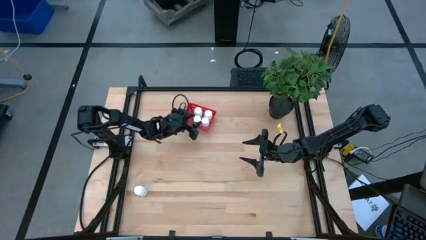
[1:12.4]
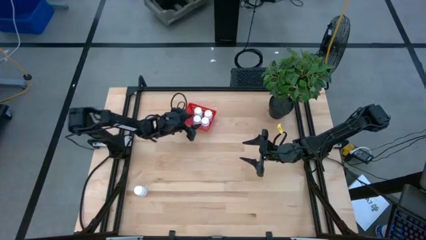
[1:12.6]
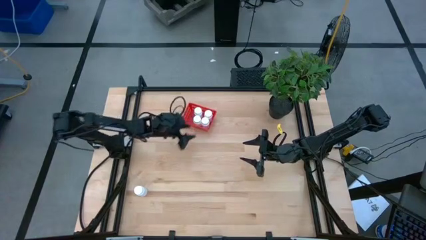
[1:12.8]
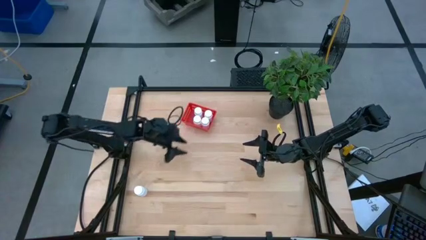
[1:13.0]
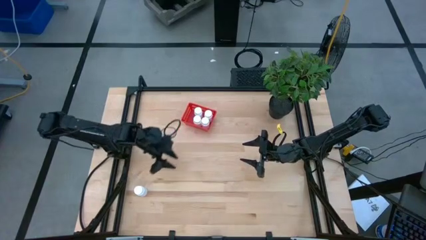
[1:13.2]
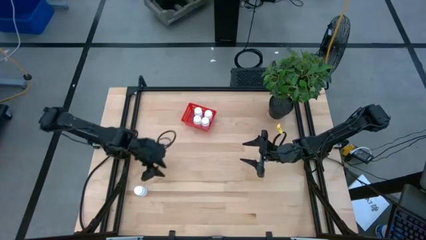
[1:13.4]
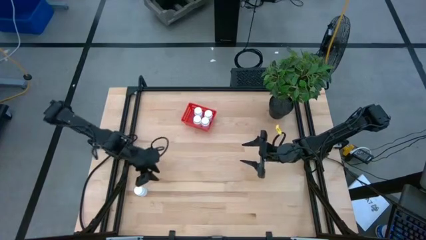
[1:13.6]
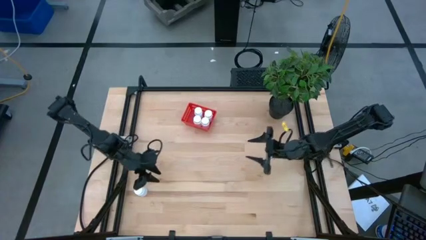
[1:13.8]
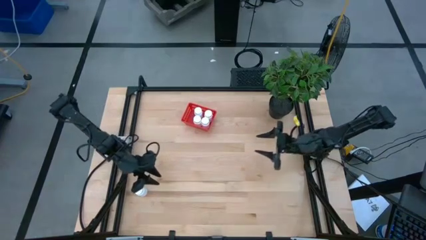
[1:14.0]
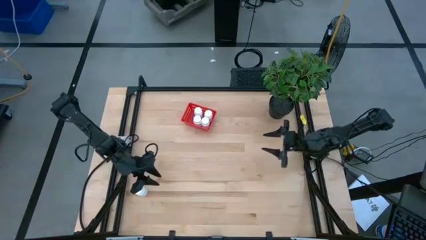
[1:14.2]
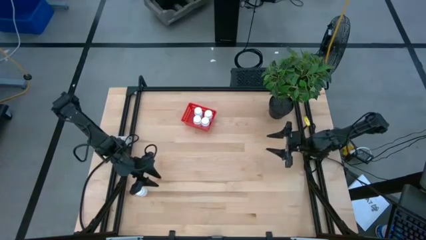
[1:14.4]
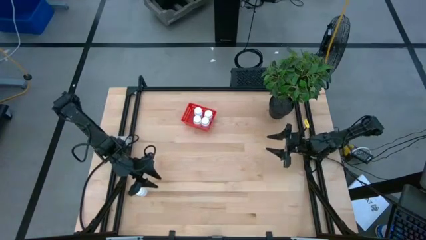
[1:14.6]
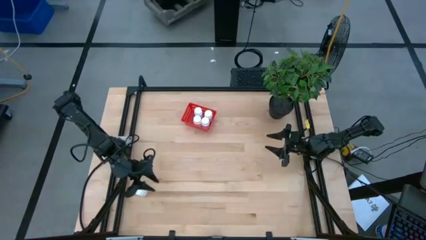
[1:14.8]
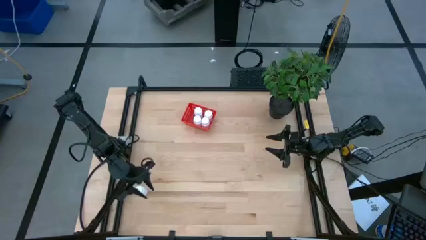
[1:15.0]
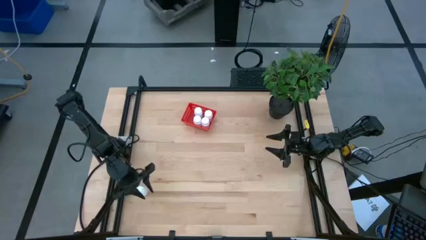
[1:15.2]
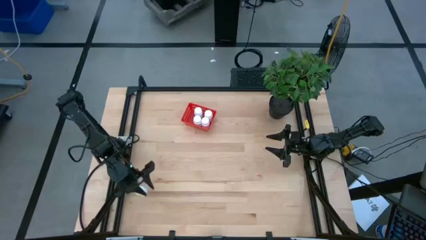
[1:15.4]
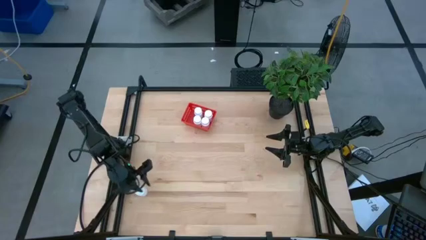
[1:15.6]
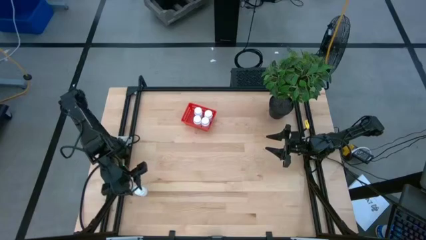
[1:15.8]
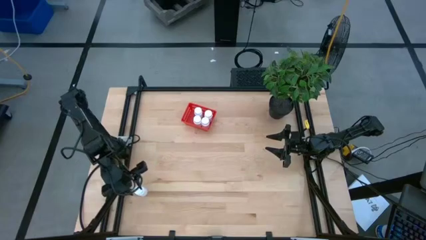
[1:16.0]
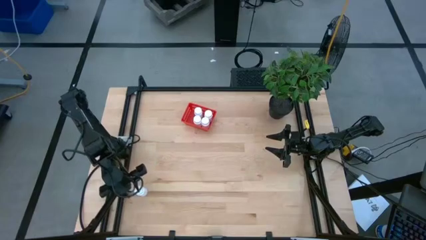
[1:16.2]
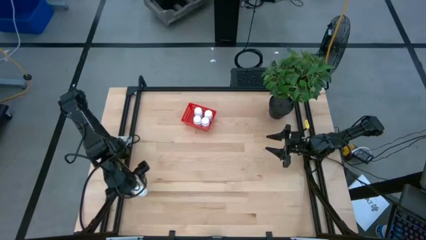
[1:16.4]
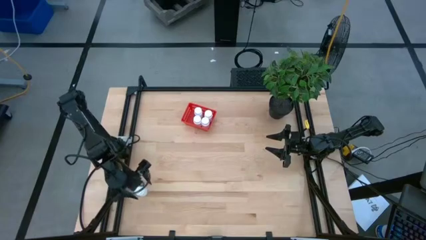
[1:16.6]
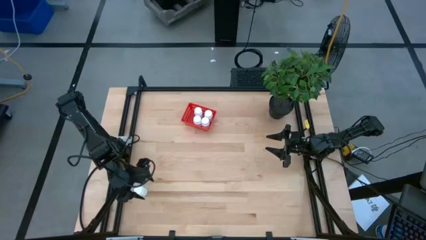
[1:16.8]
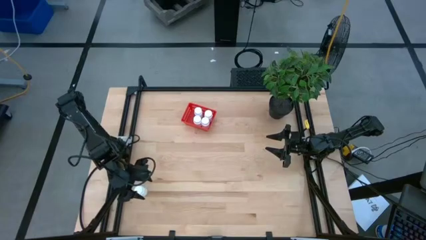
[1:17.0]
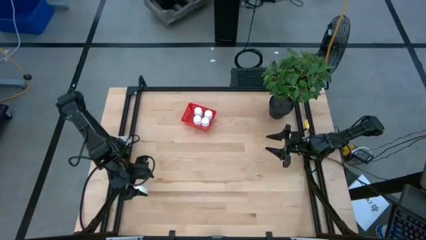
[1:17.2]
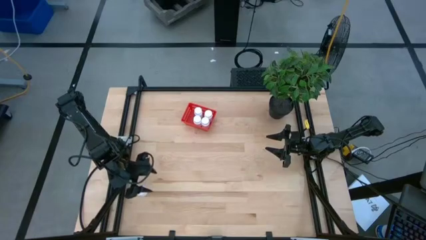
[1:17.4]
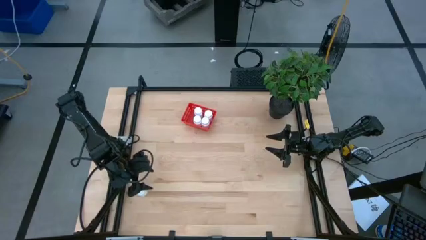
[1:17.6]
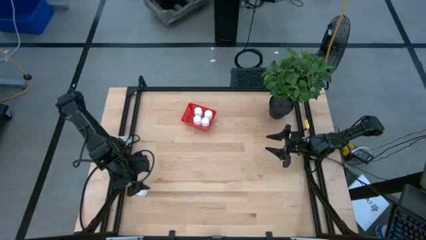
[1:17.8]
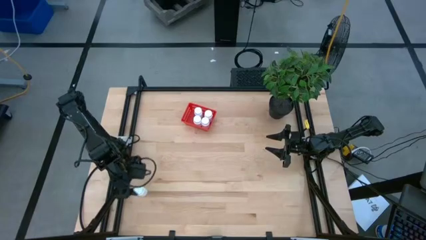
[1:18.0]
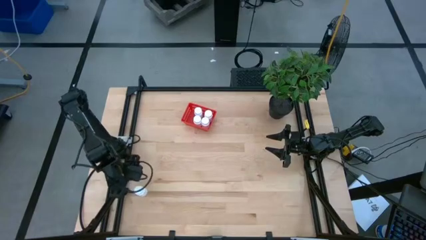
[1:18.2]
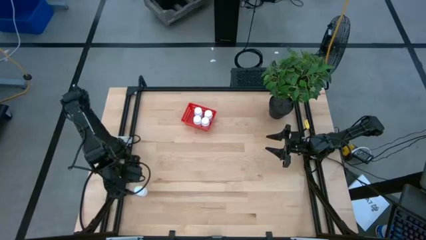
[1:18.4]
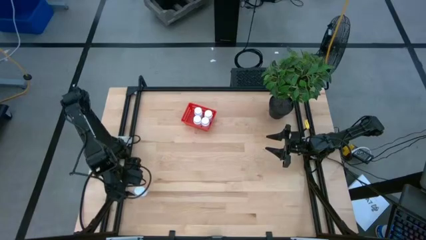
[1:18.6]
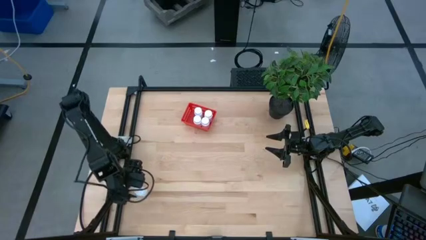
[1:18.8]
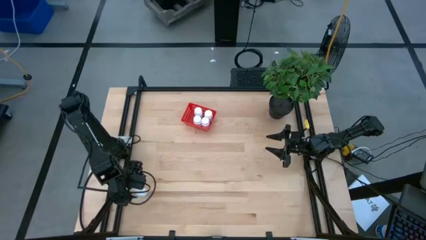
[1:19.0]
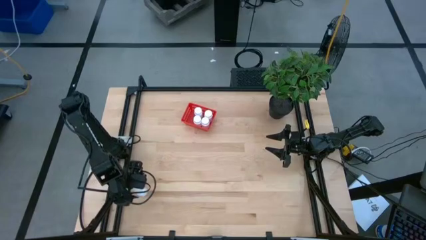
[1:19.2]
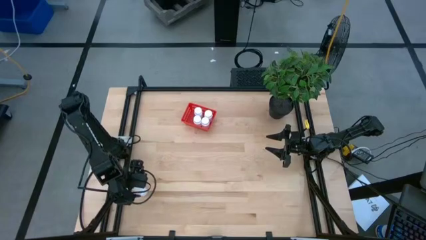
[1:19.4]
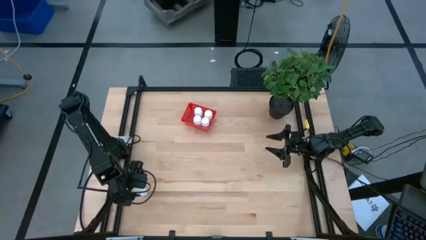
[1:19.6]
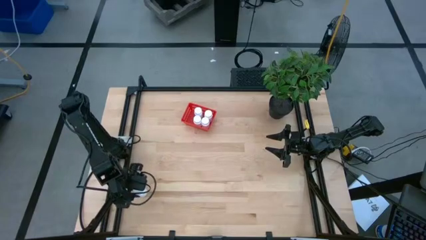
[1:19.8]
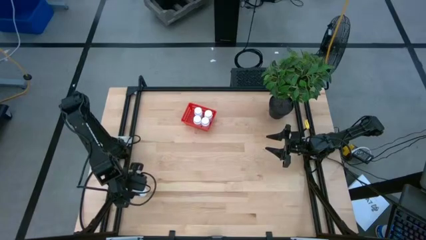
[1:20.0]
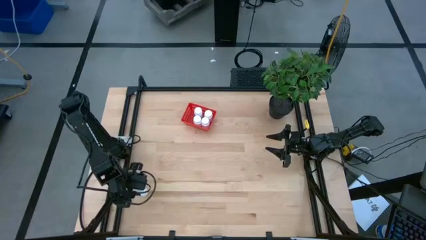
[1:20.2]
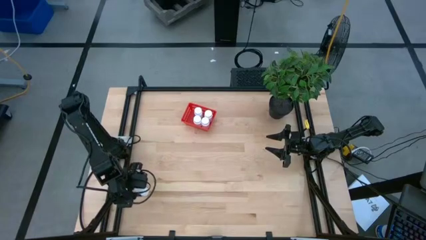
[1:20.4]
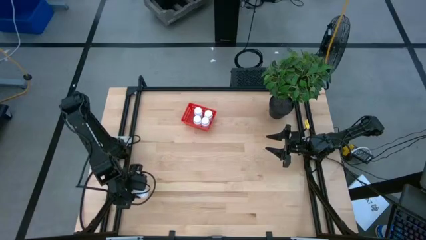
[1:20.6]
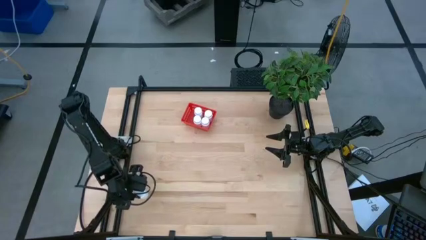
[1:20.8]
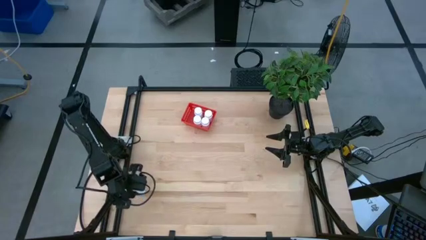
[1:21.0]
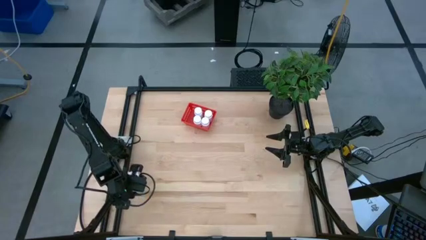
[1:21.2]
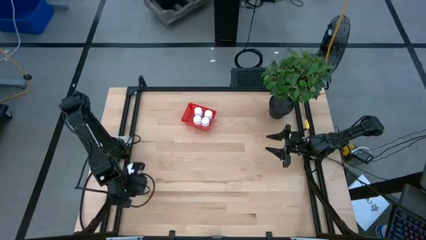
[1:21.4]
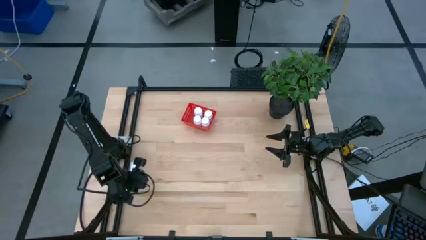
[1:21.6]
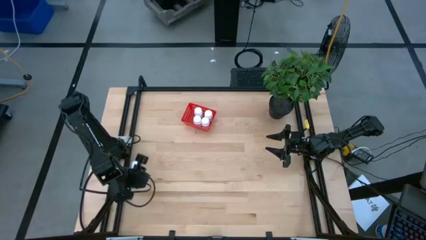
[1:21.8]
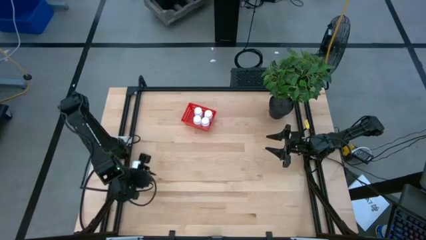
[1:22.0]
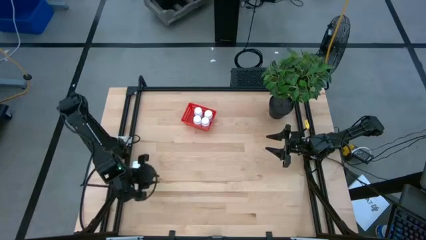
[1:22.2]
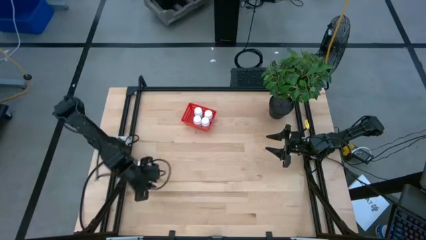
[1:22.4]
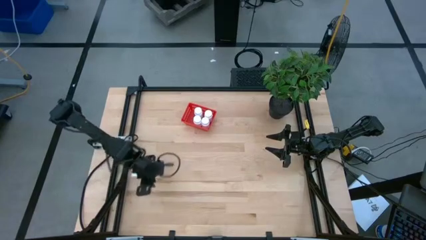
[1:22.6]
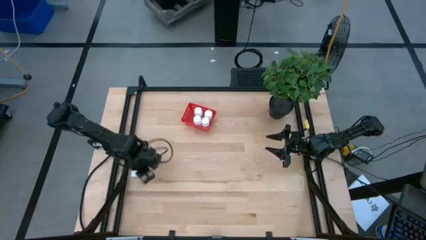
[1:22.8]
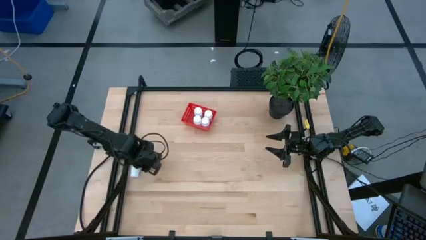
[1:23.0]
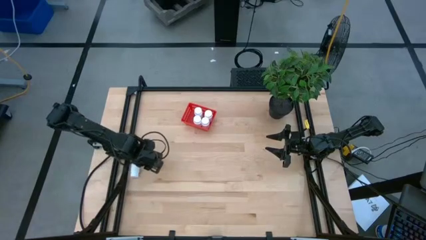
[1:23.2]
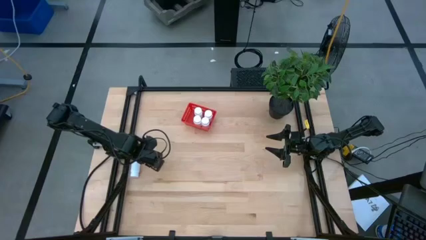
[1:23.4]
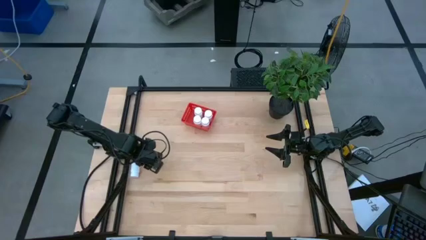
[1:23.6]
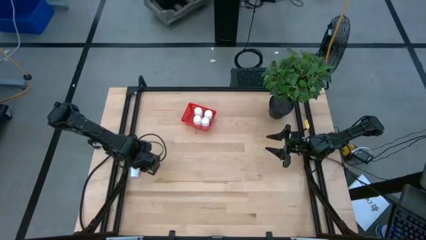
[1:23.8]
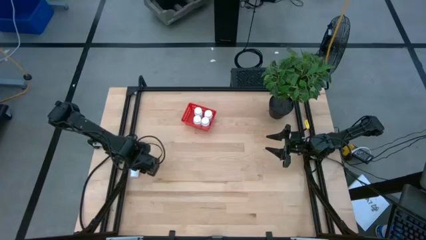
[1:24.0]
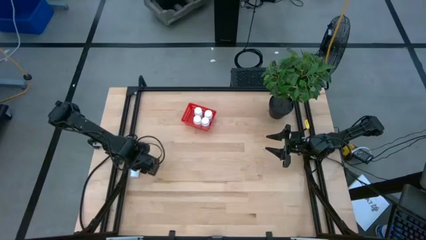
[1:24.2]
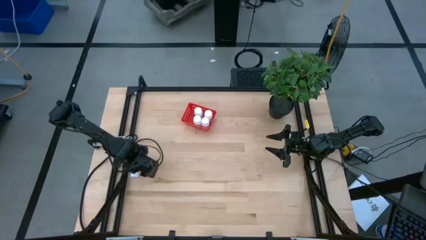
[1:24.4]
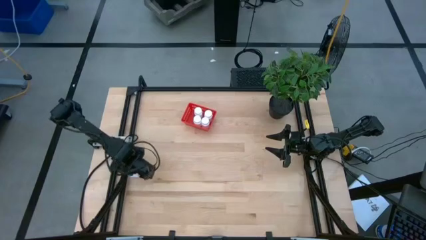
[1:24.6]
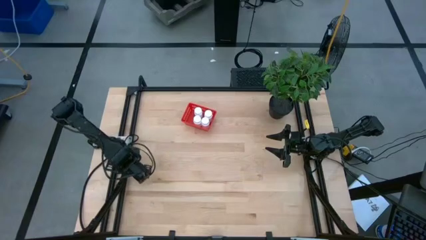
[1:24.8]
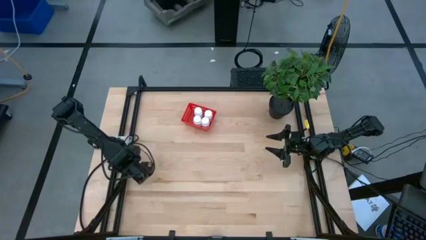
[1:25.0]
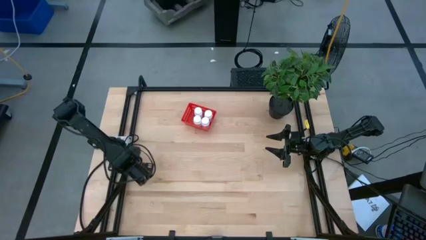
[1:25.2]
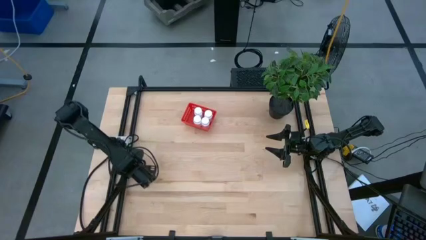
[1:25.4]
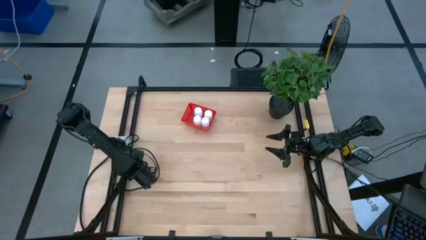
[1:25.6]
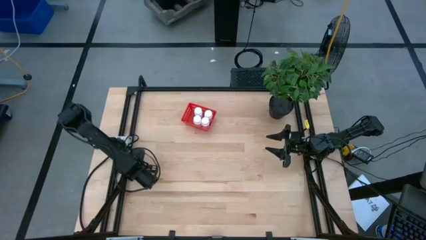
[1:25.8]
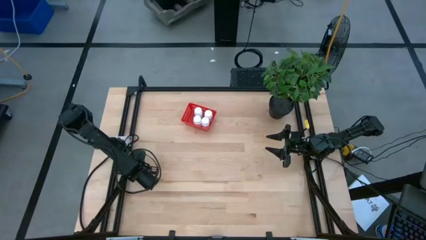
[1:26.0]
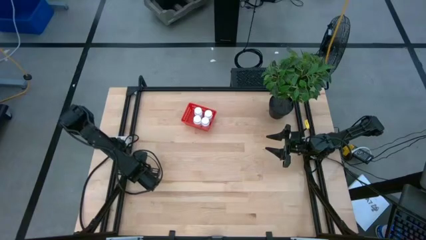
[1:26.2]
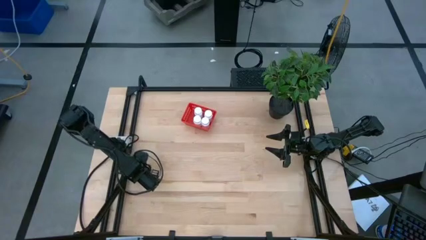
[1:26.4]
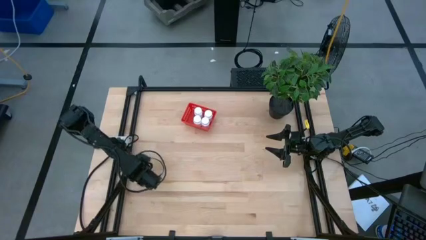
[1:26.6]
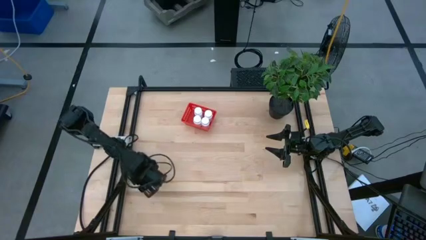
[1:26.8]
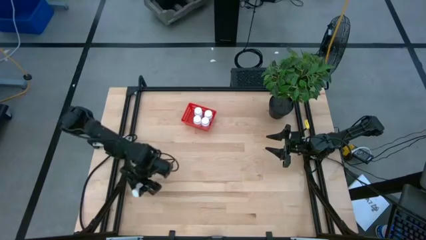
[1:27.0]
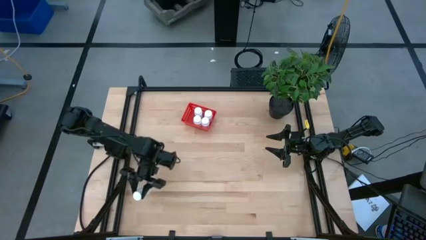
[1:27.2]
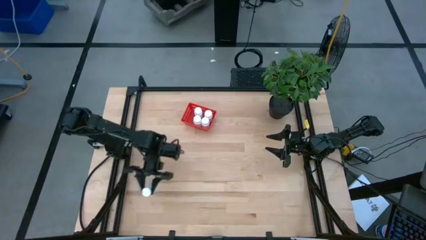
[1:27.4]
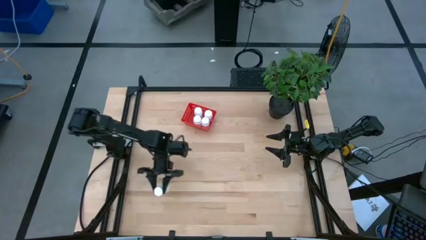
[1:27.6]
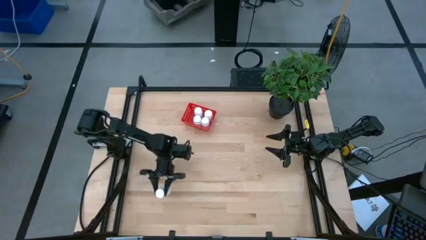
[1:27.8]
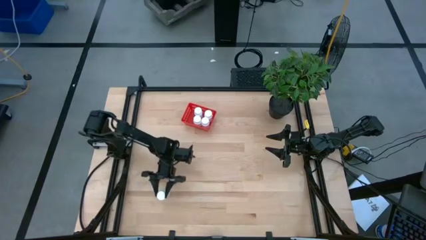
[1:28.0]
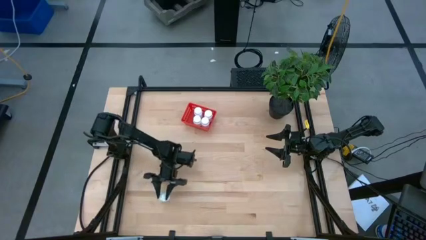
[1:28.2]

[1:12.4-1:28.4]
Task: Pick and place pill bottles into a basket
Put the white pill bottle into the orange basket
